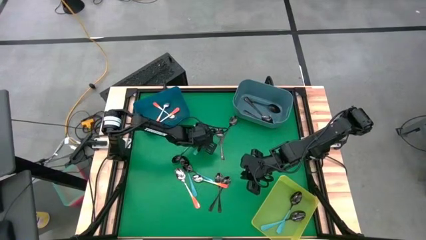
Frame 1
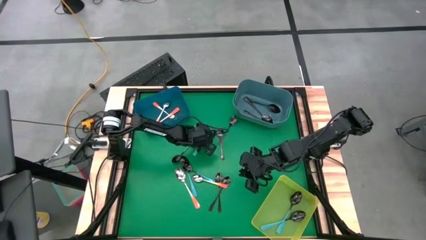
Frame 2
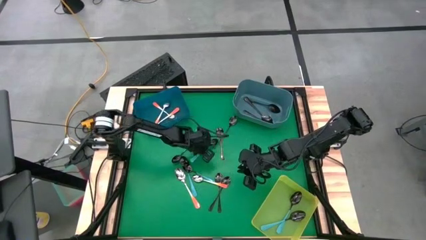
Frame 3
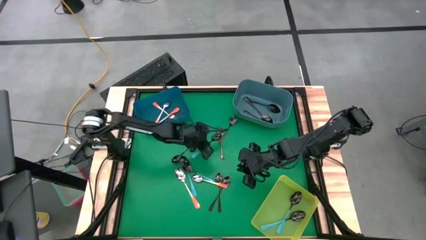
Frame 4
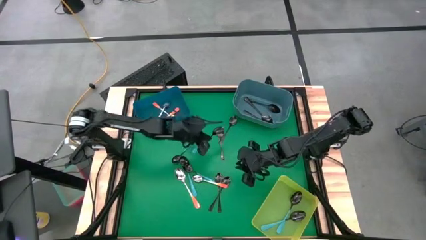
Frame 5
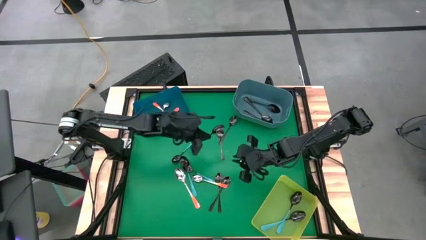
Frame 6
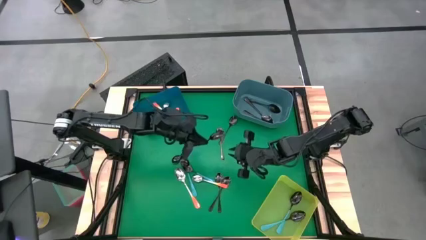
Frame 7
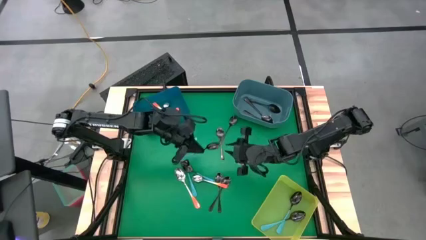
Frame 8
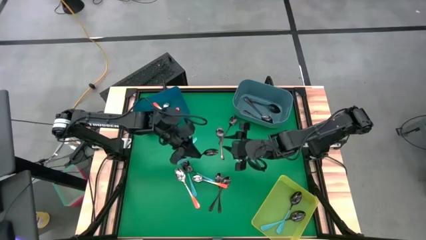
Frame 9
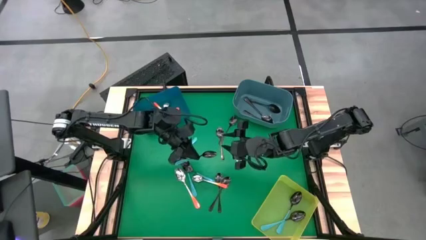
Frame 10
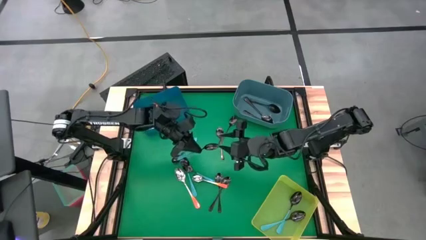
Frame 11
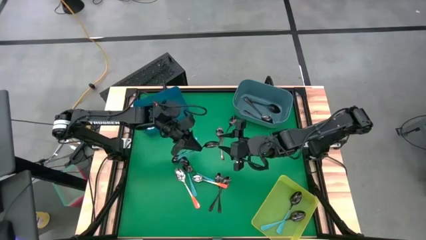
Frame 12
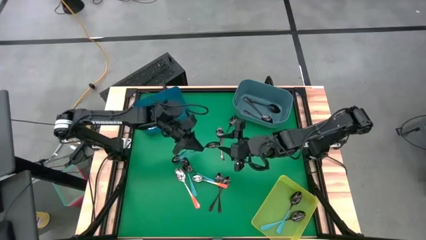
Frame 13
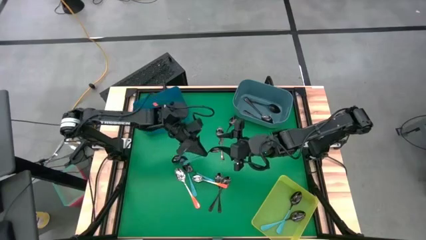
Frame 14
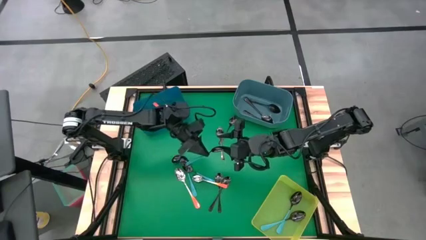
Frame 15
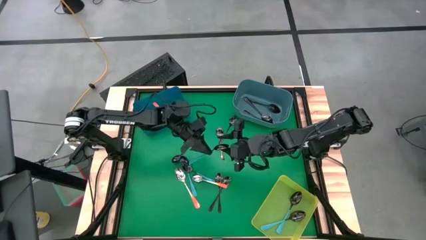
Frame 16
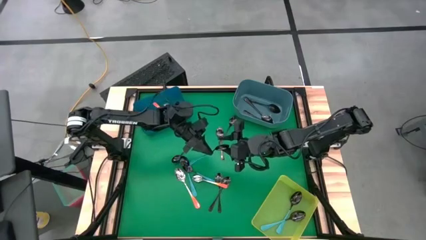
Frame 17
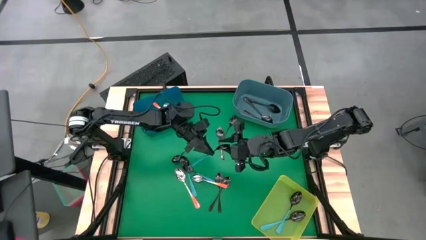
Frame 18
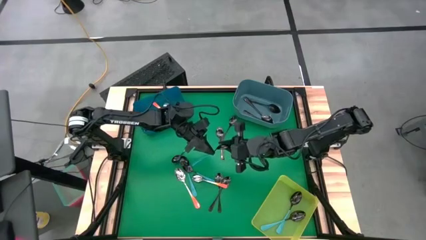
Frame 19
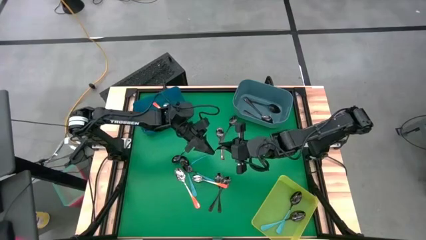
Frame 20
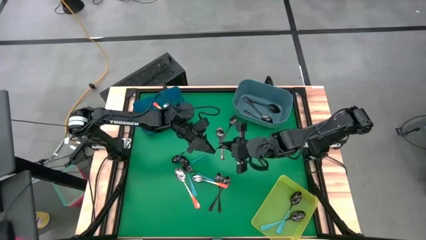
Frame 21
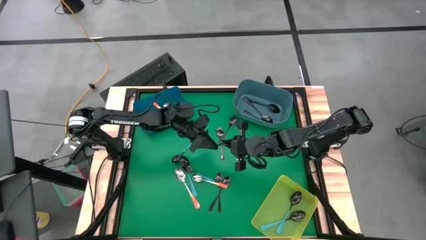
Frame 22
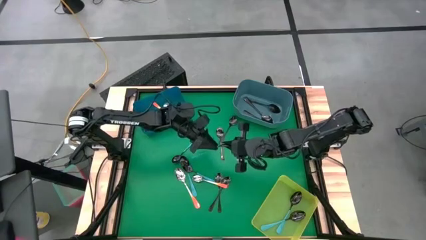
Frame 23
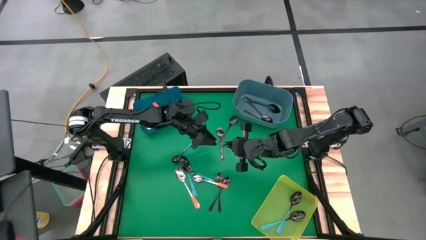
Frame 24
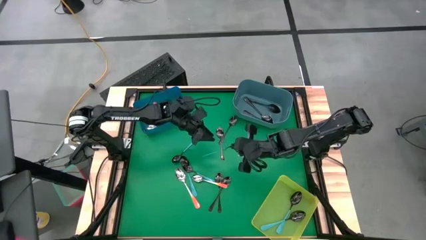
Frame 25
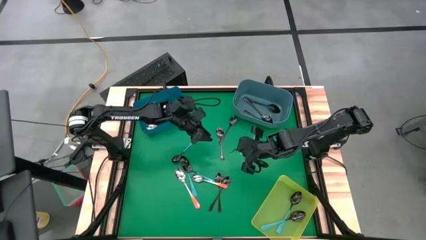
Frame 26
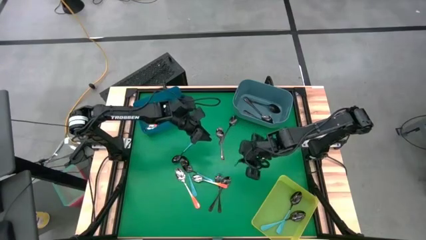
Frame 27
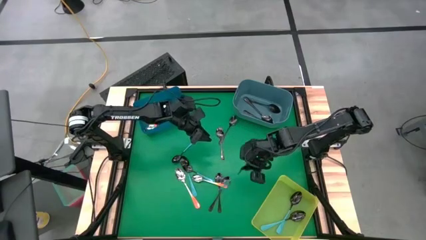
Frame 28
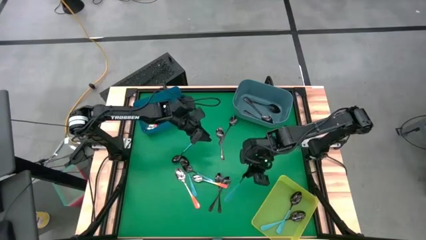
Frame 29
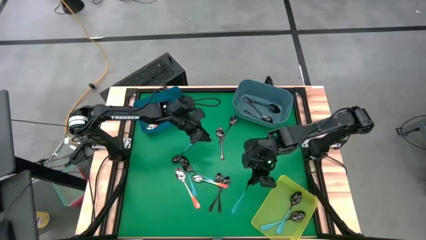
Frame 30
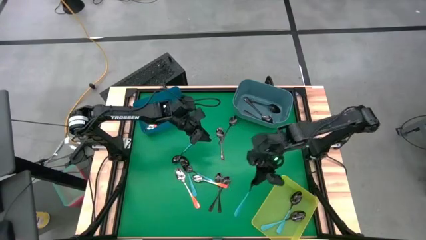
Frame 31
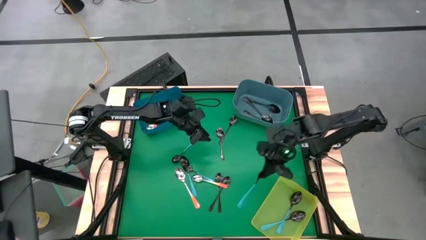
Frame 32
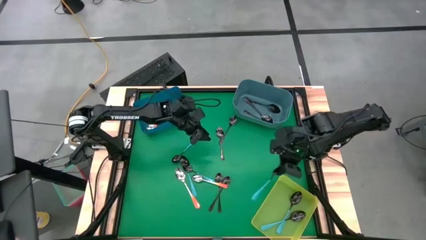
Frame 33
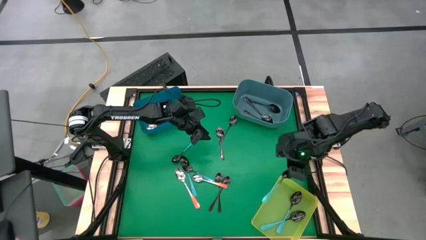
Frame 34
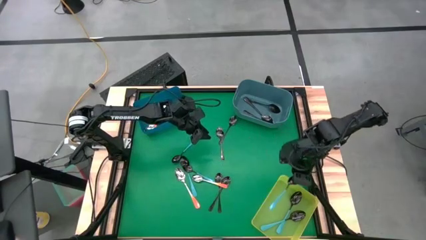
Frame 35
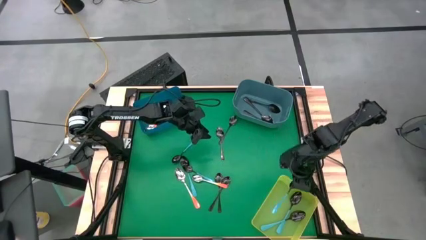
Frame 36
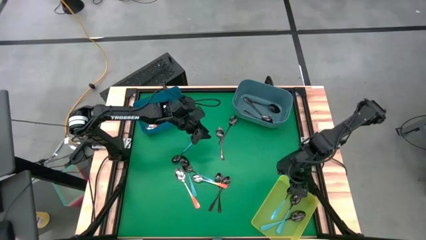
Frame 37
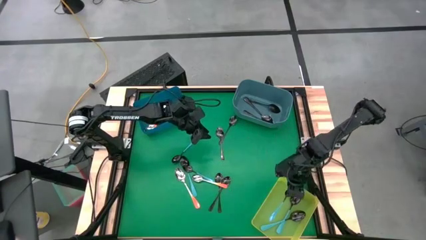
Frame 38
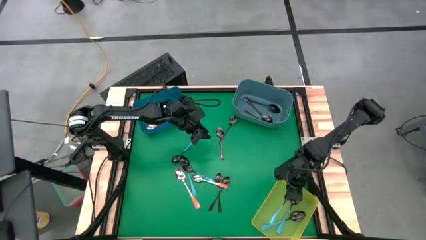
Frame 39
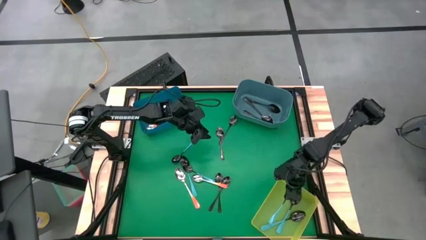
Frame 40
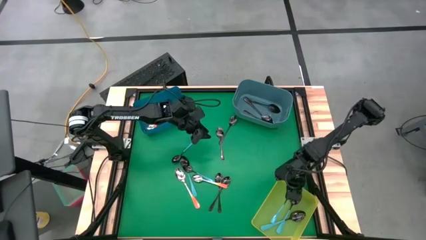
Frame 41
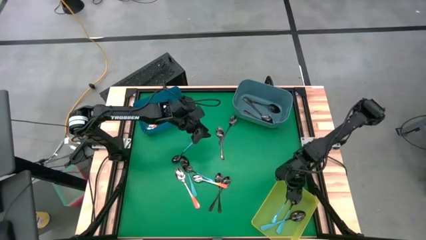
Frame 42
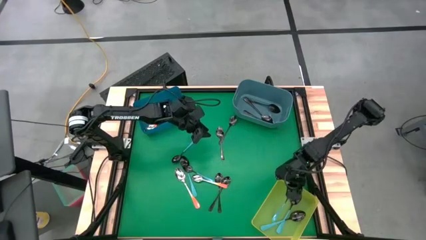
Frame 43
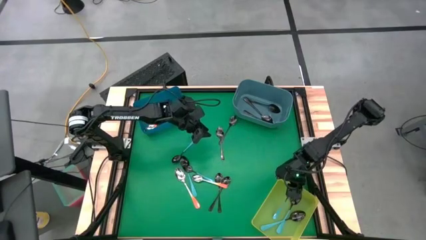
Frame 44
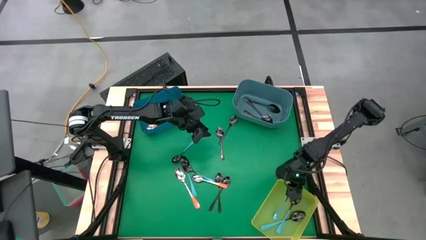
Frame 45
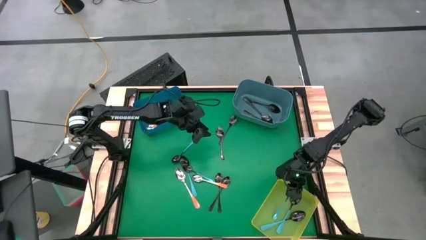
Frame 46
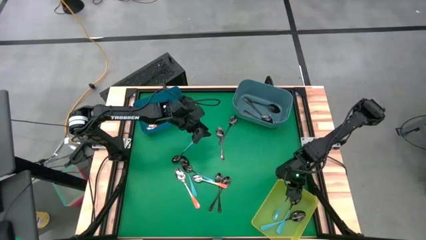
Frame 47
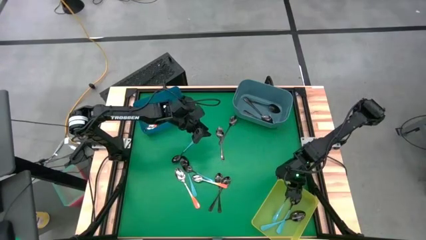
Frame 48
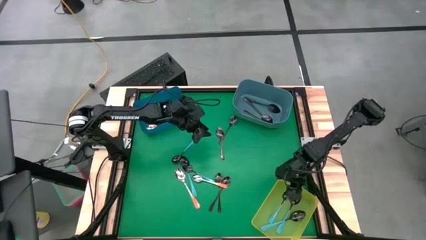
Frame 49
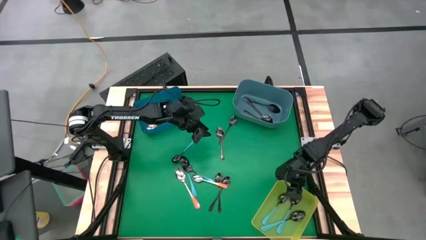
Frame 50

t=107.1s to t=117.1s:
Task: Sort silverware by color (type)
Put the blue spoon into the yellow bin

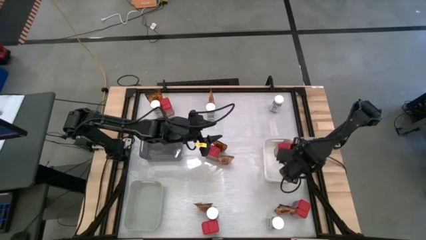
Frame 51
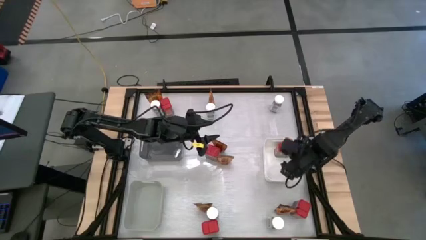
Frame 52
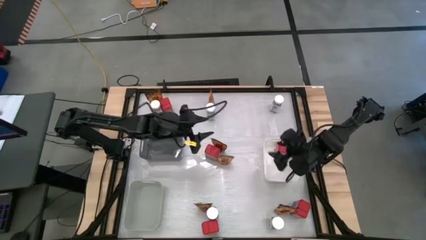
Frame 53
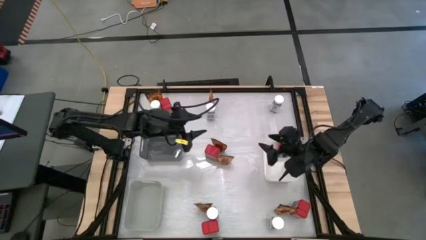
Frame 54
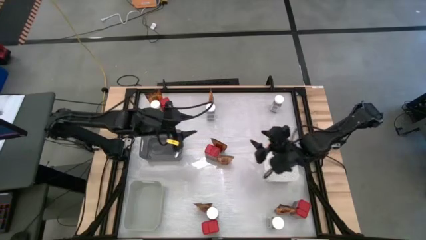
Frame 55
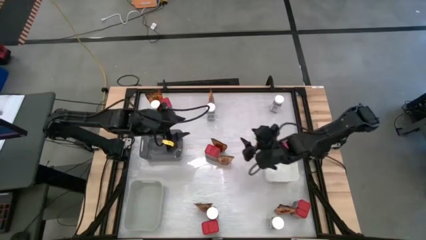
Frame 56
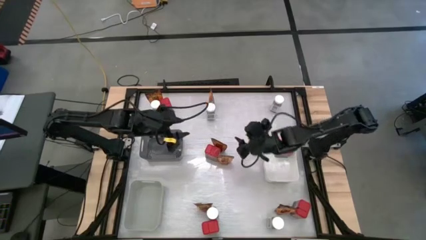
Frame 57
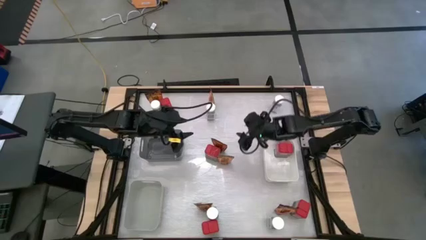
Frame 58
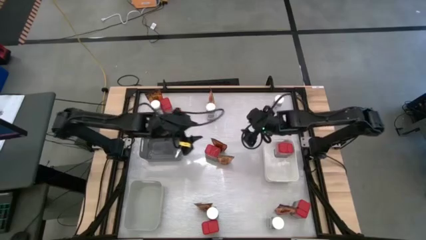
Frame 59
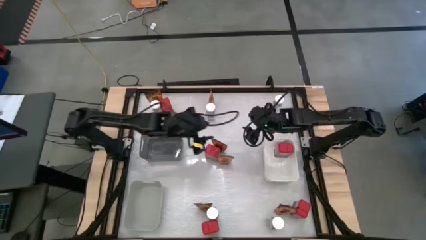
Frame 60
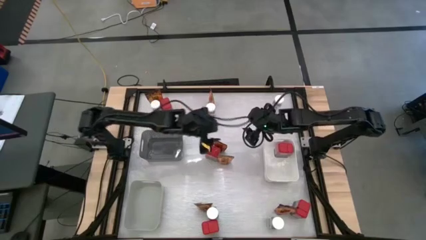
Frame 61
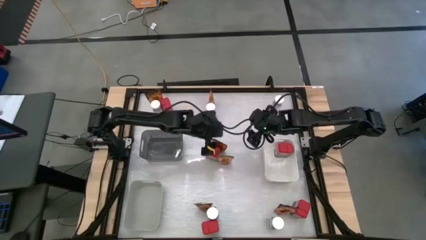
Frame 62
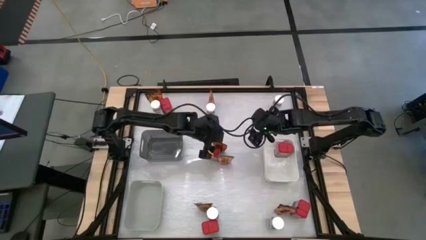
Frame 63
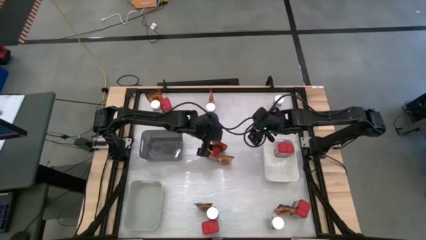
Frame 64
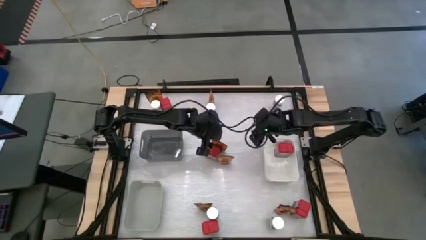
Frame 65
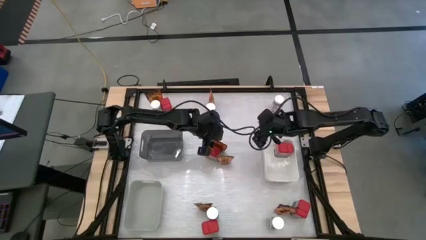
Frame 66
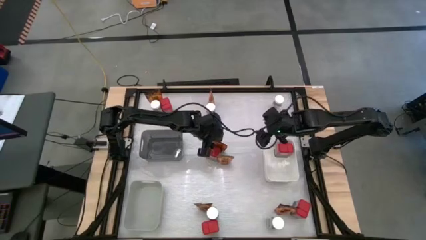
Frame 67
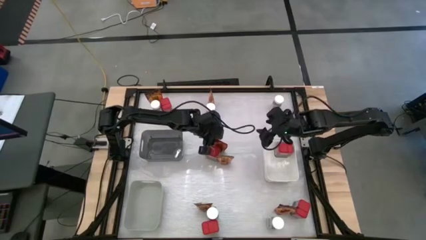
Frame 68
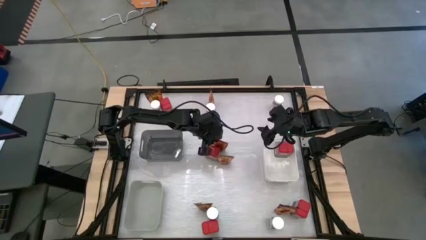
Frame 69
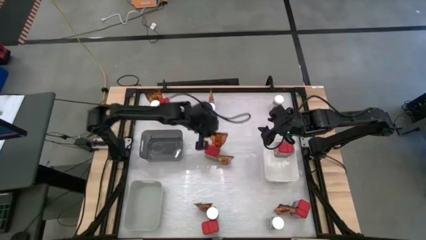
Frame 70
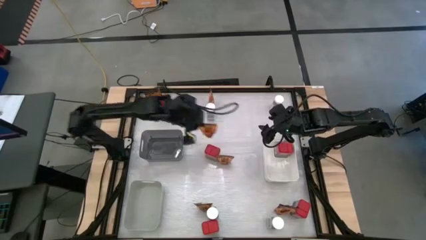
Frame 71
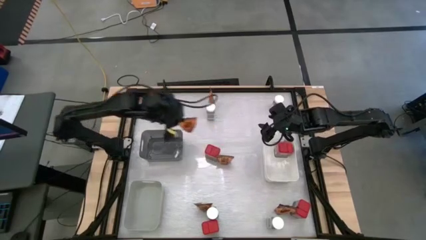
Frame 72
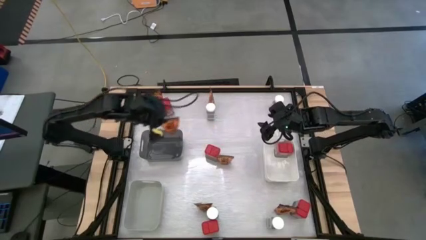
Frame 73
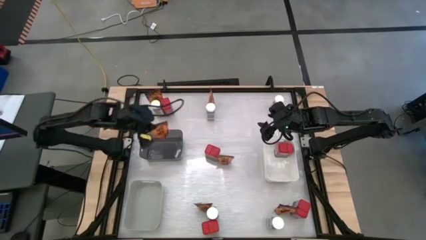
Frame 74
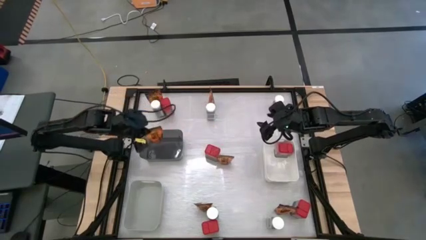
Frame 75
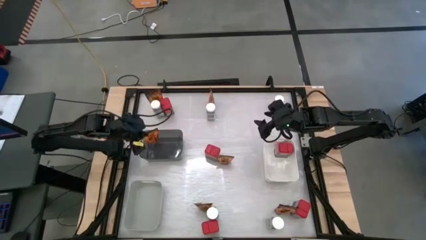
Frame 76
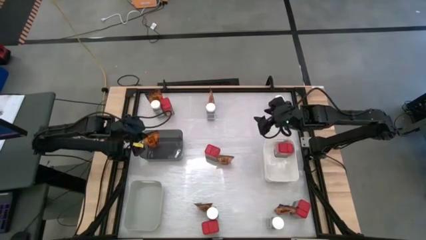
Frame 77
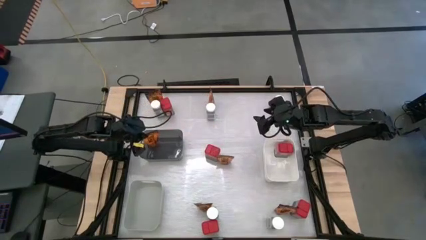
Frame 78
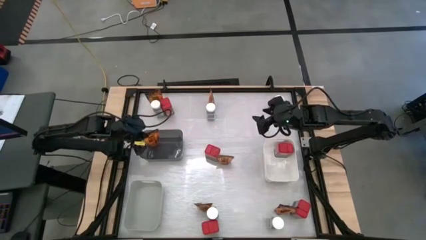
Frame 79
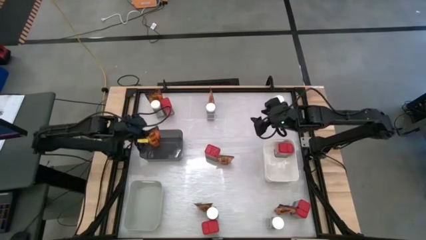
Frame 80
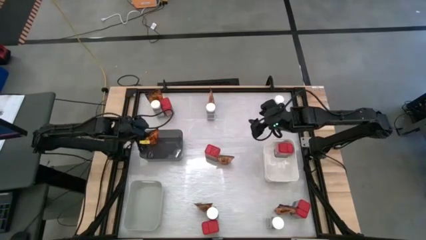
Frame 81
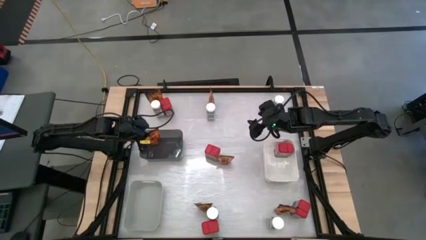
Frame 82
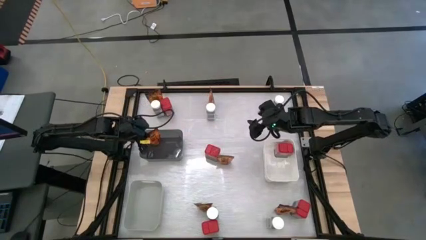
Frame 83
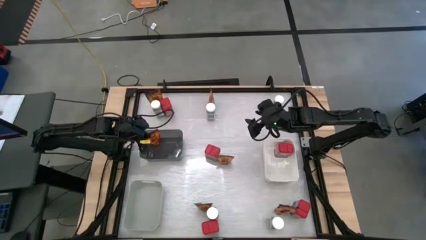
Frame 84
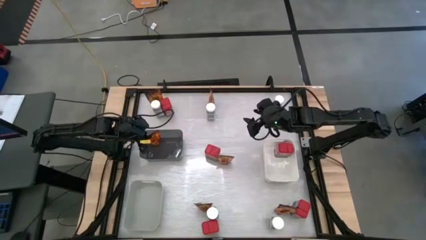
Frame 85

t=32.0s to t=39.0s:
Task: Sort spices by type
Put the orange spice pack into the black bin
